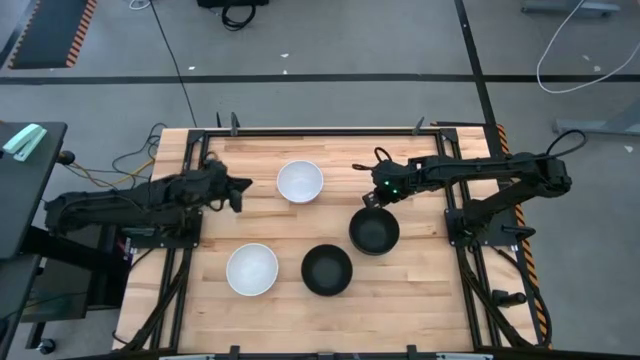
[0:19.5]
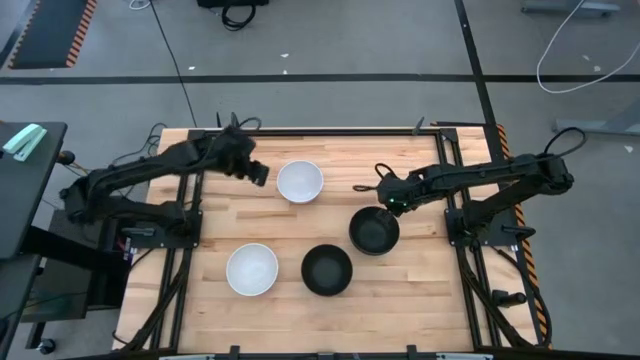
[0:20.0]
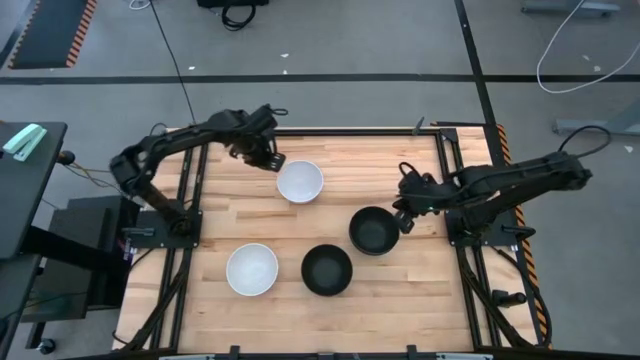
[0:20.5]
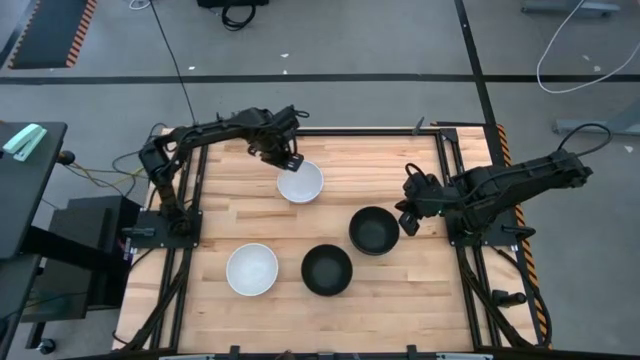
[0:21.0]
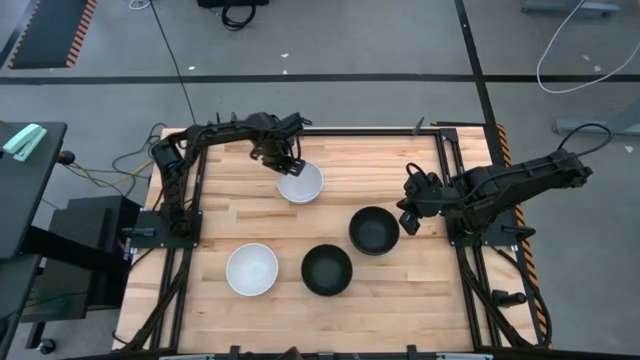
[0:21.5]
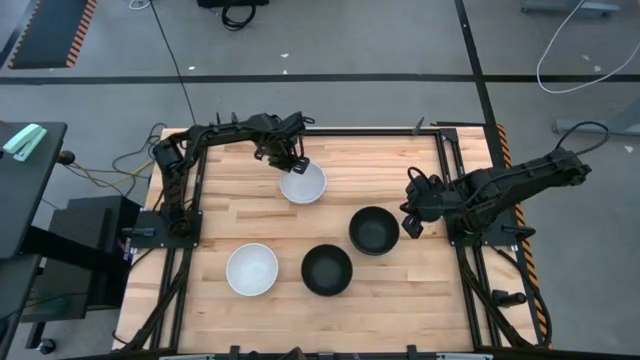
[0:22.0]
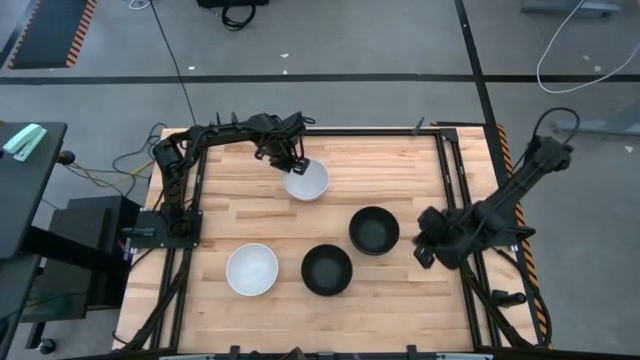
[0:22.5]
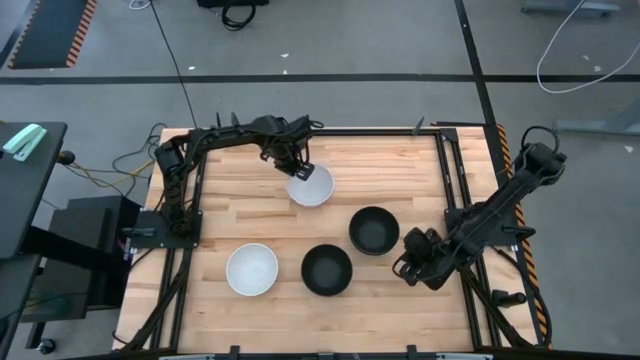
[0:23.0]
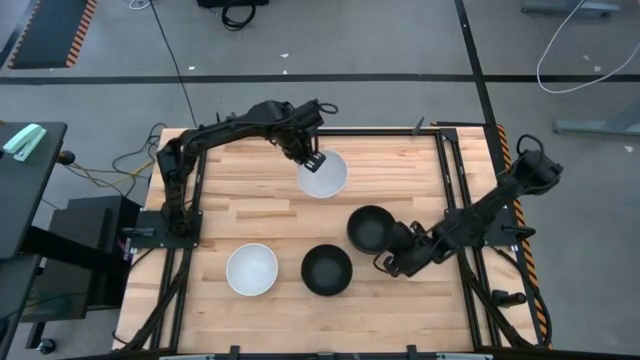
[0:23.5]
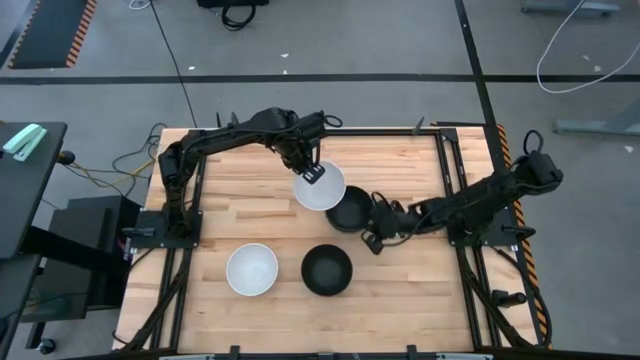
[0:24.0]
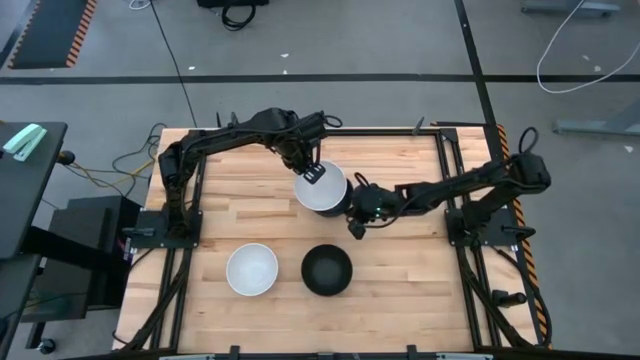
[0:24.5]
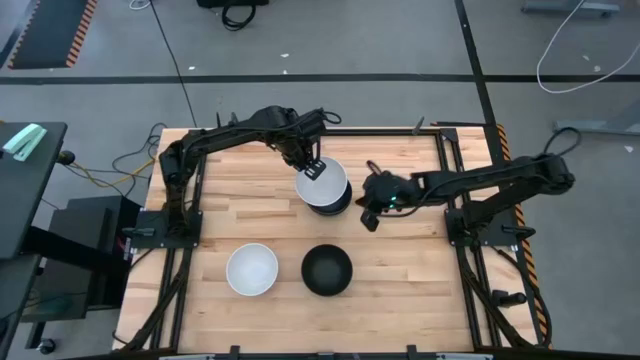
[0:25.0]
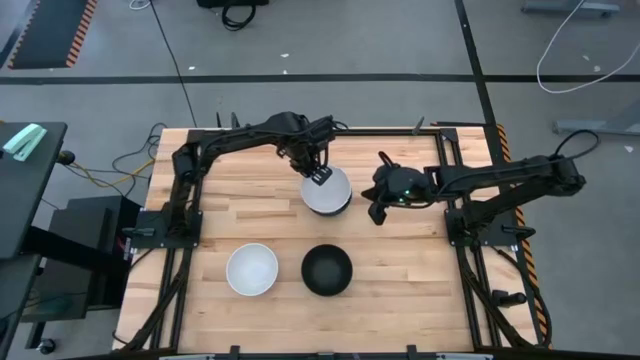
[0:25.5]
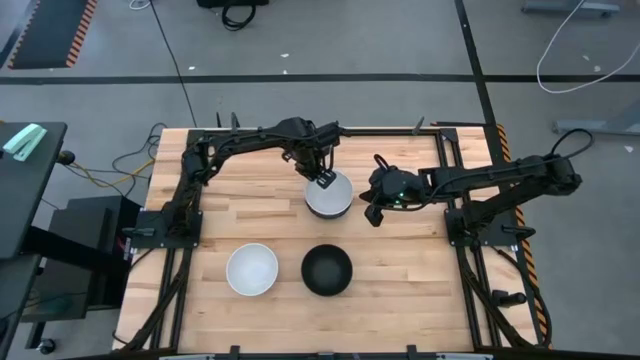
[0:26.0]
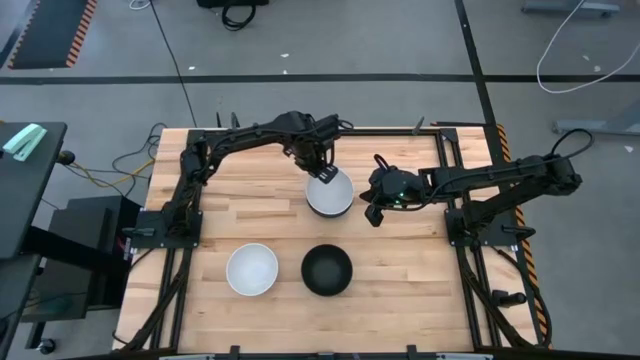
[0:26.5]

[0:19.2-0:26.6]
Task: Nest bowls inside each other
Stack the top white bowl on top of the top black bowl

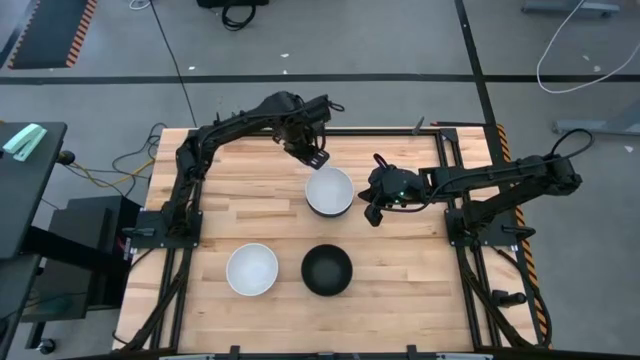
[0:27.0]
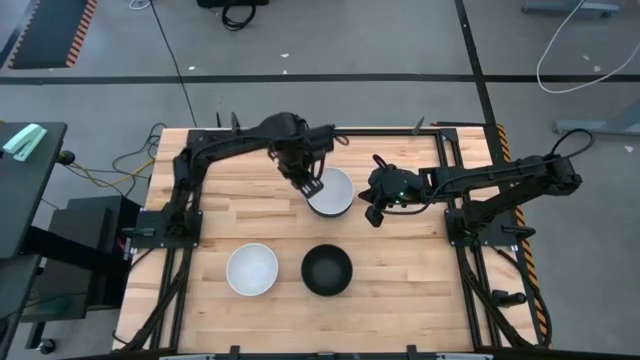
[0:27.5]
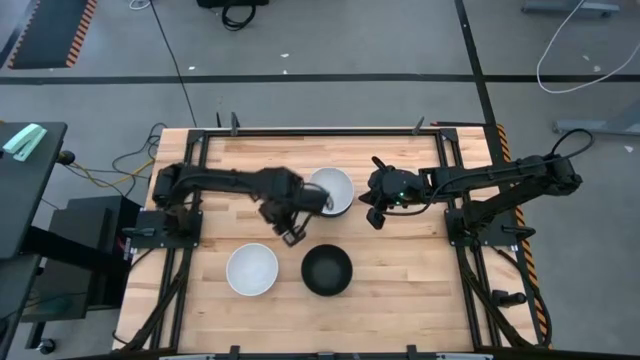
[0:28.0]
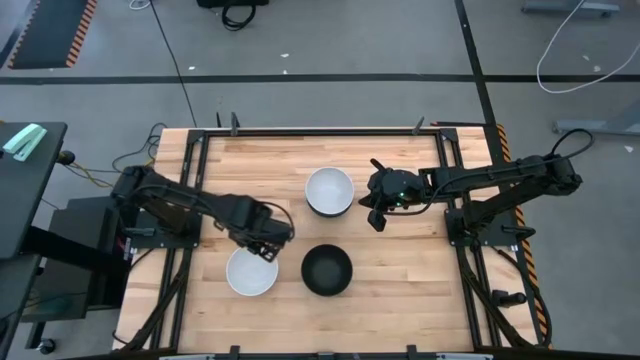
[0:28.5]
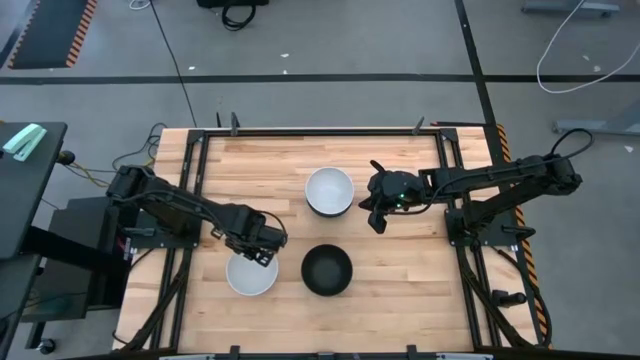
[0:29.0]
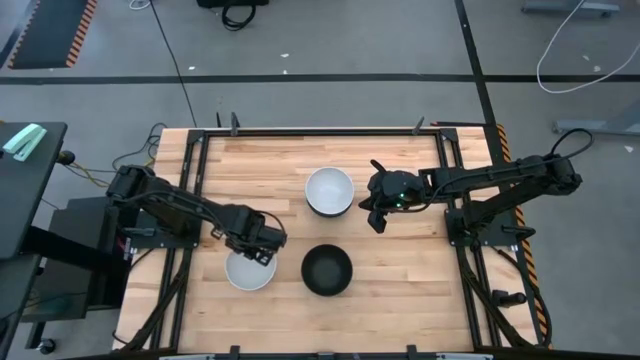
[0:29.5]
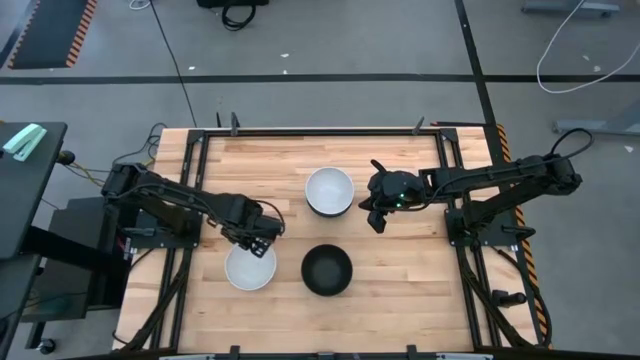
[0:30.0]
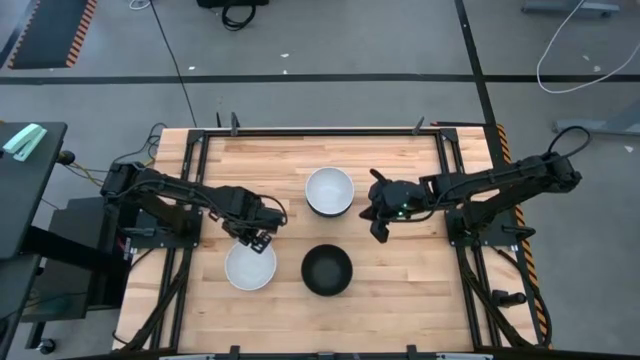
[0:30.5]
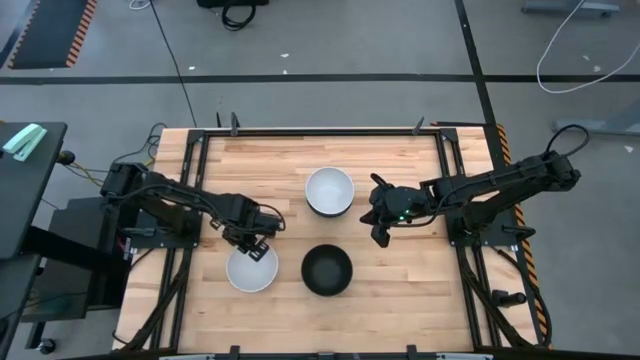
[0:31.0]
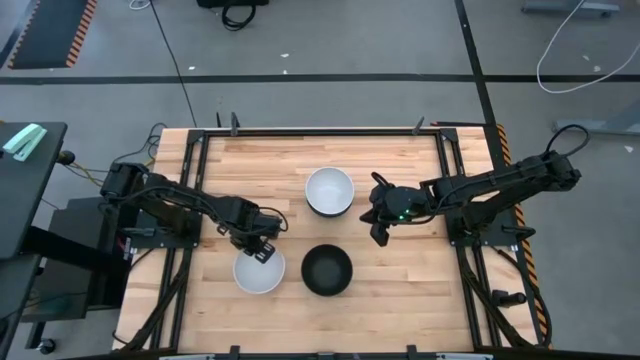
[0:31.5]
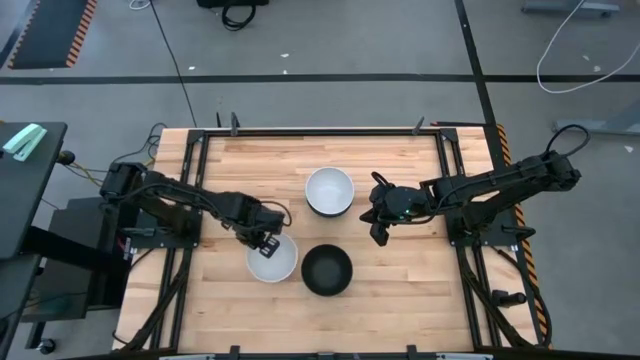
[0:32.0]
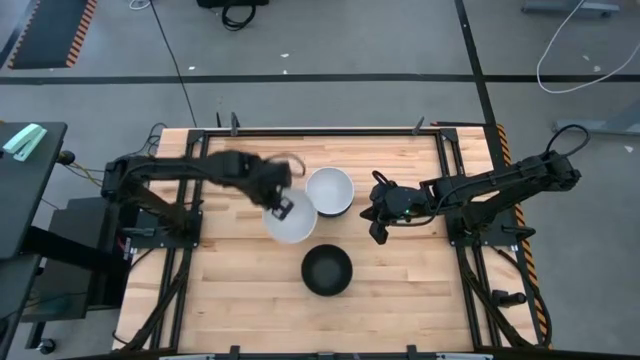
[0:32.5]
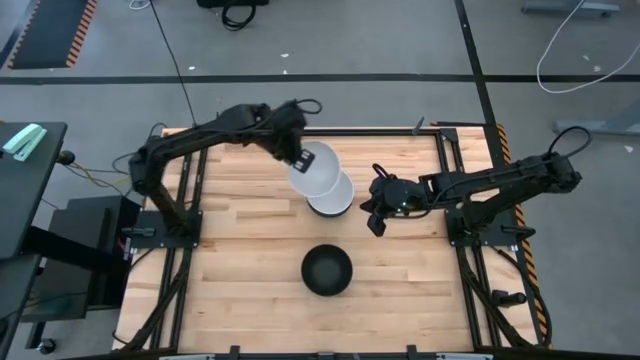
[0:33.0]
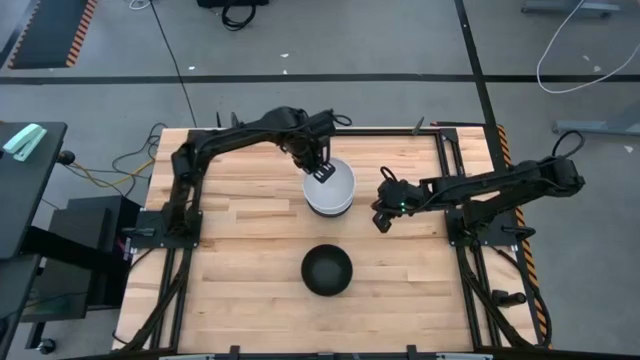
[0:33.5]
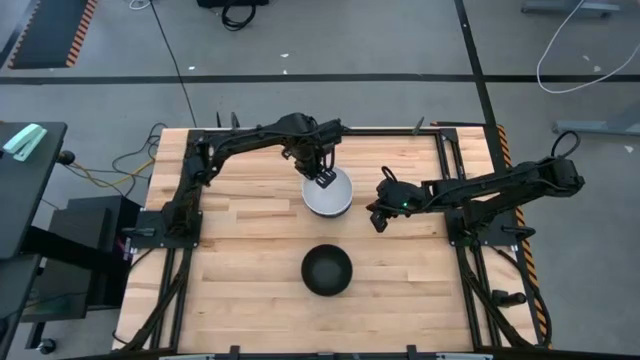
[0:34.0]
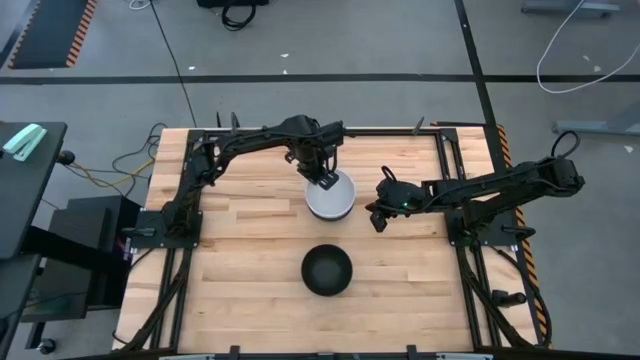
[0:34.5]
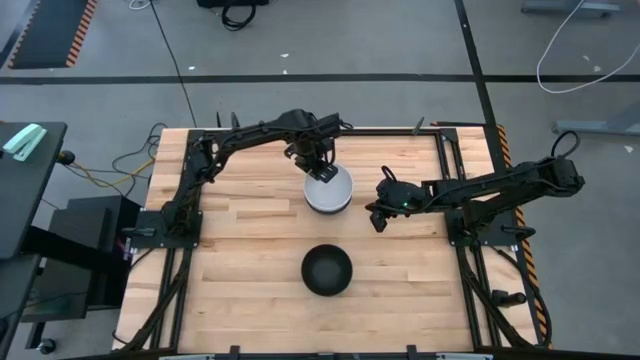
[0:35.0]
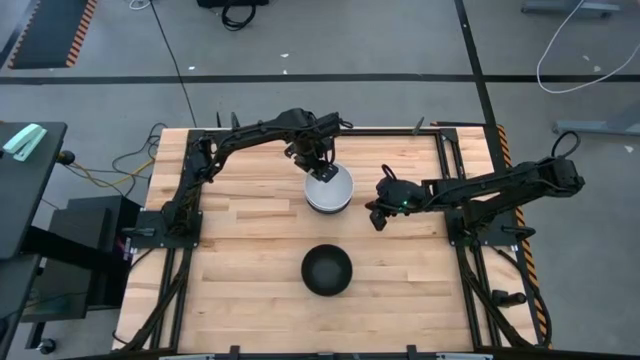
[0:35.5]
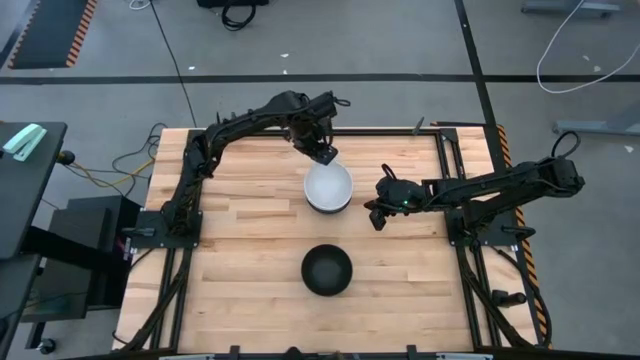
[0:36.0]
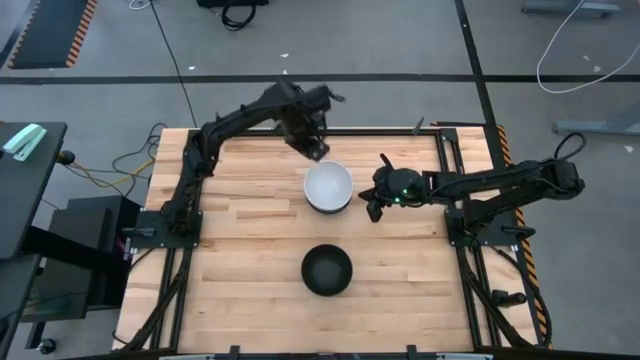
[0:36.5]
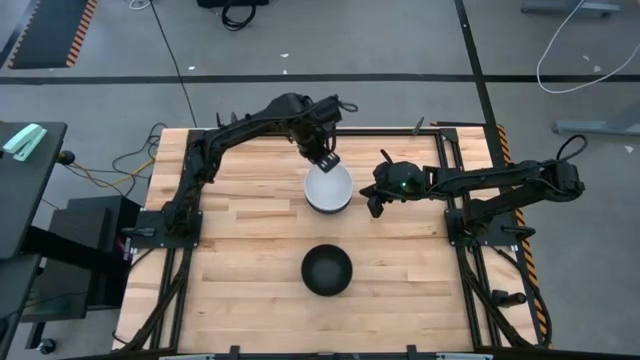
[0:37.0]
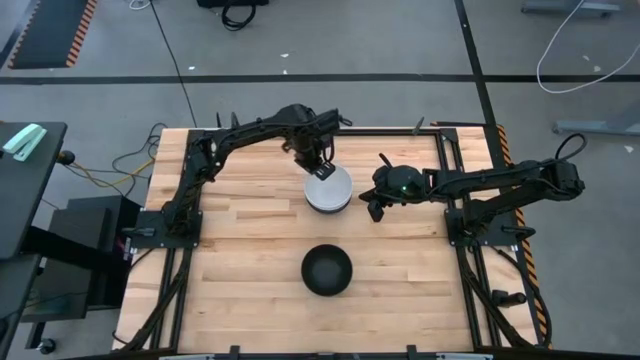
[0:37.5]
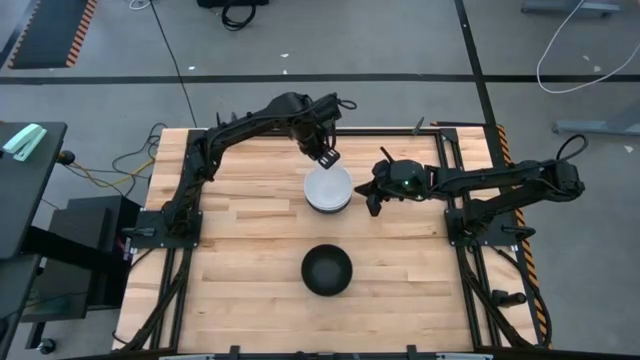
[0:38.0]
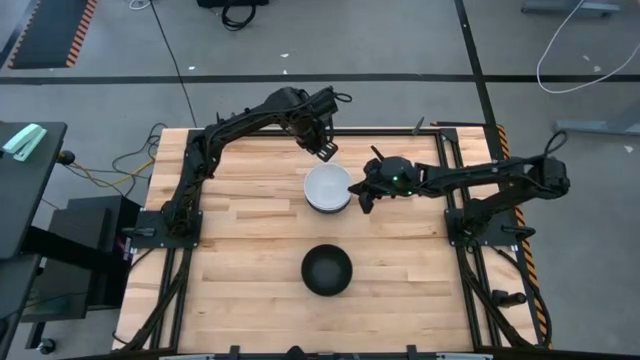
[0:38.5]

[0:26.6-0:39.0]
Stack the white bowl on top of the white bowl

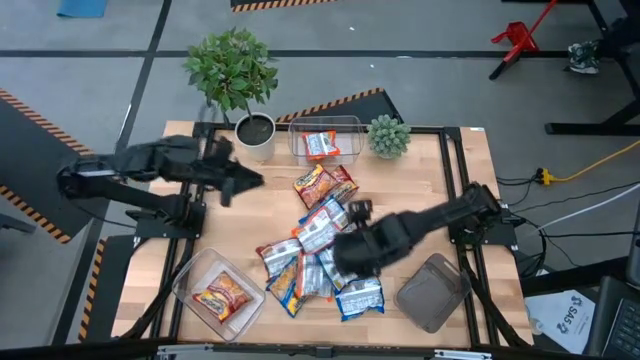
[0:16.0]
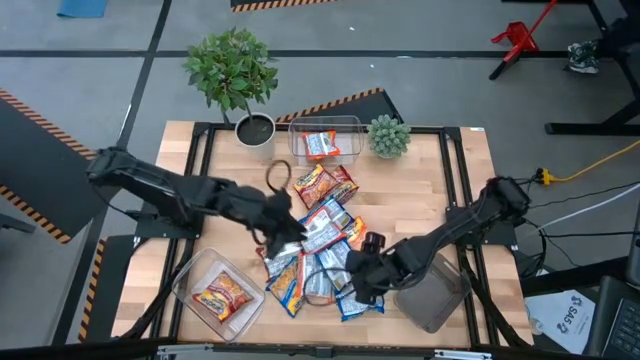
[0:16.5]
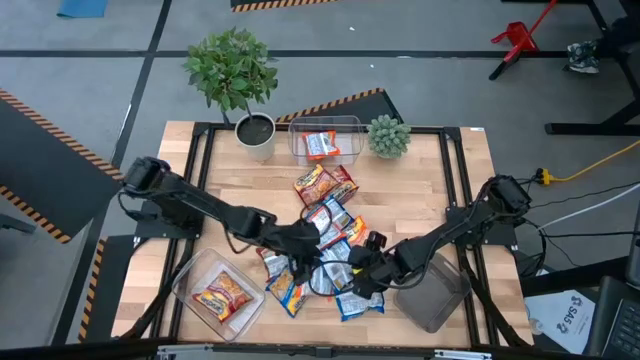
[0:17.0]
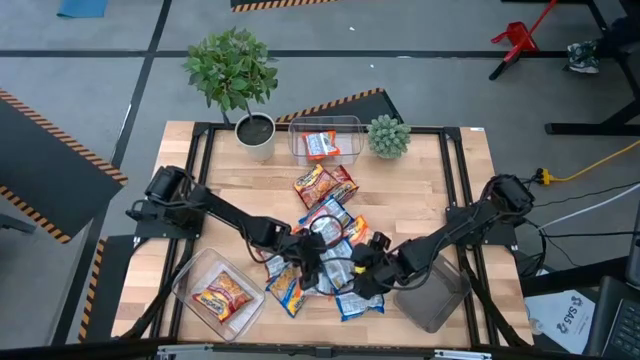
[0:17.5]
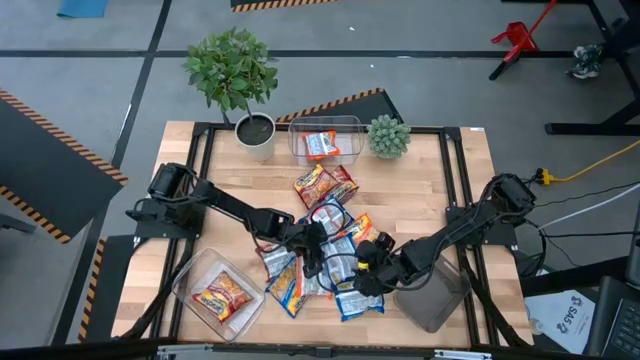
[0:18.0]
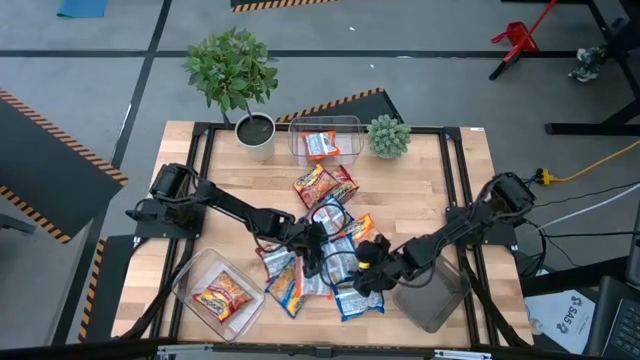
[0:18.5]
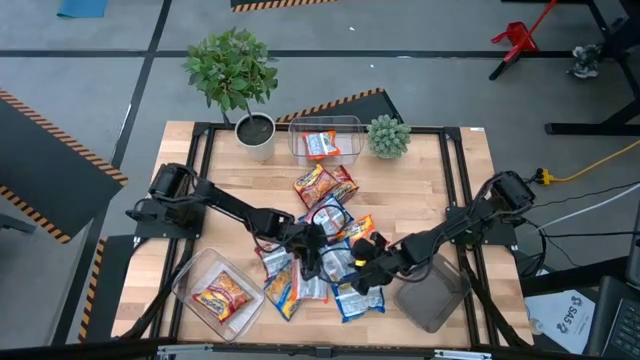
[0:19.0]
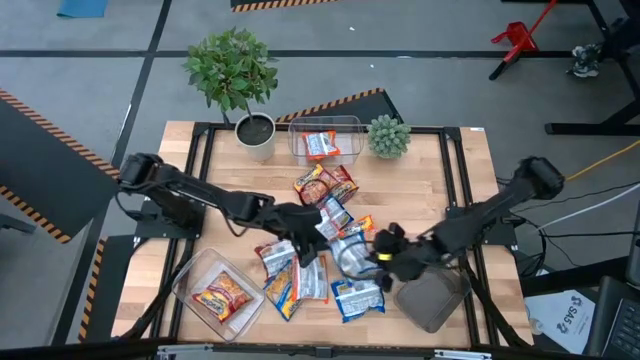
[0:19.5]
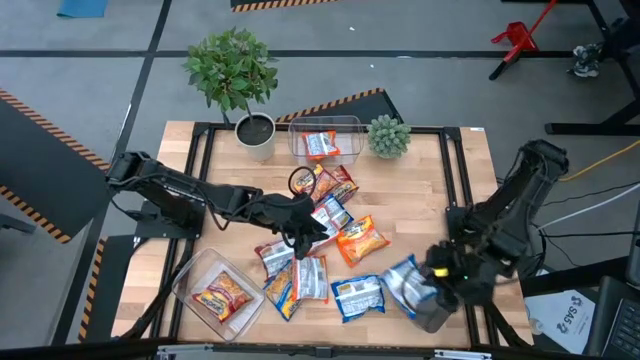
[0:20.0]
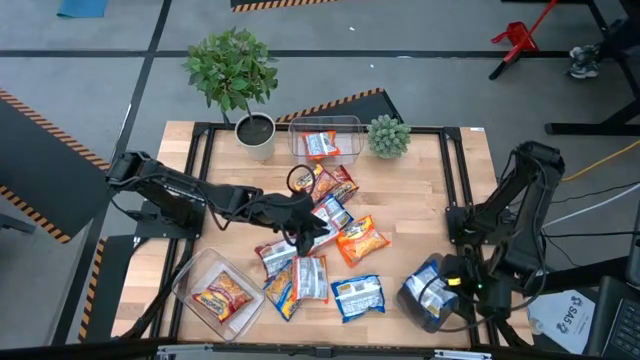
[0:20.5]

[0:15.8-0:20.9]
Task: Sort Maruchan noodles
Put the blue noodle pack into the black bin
